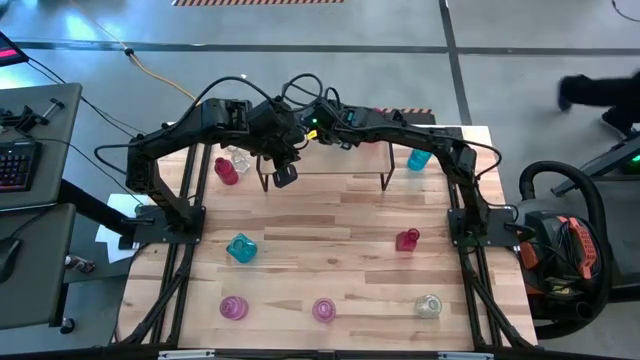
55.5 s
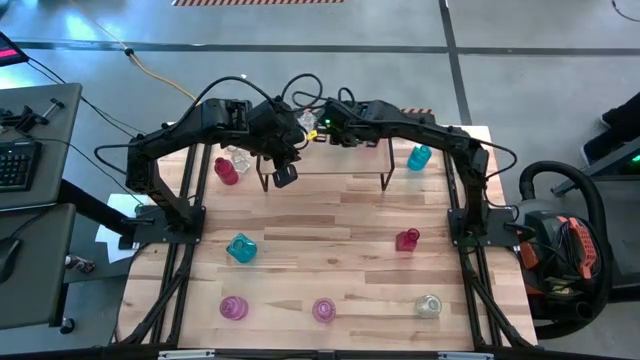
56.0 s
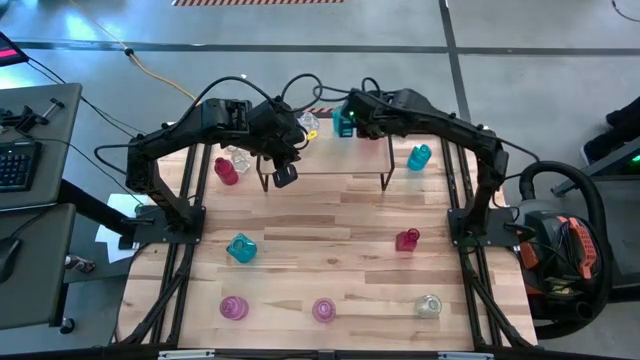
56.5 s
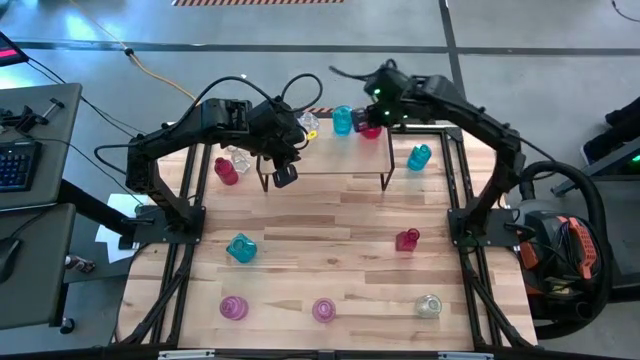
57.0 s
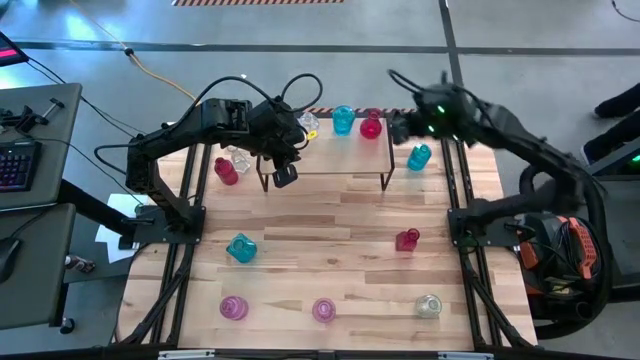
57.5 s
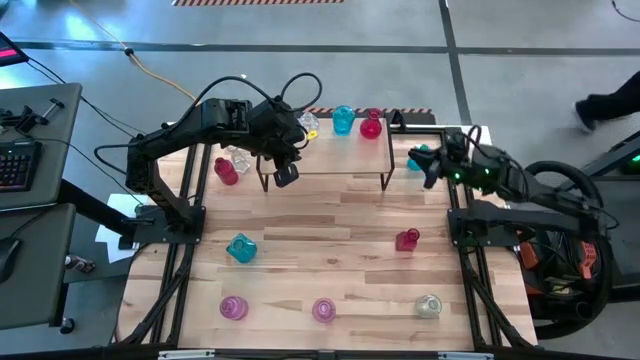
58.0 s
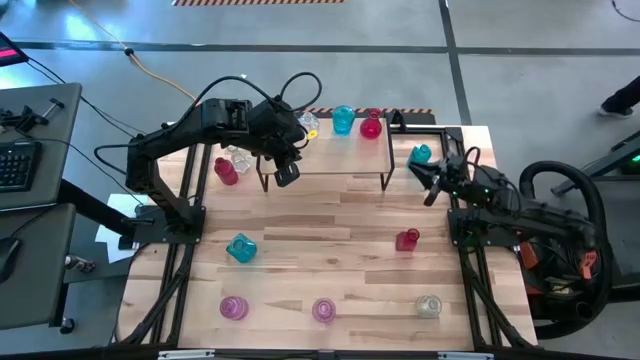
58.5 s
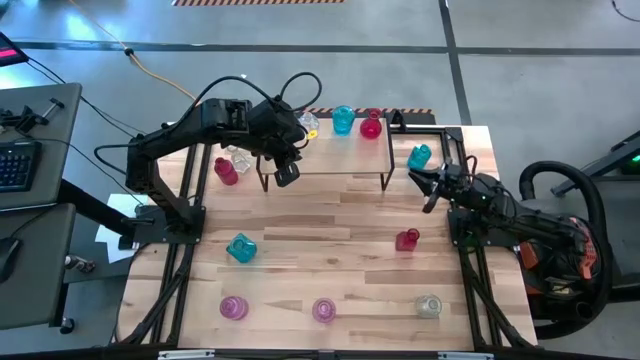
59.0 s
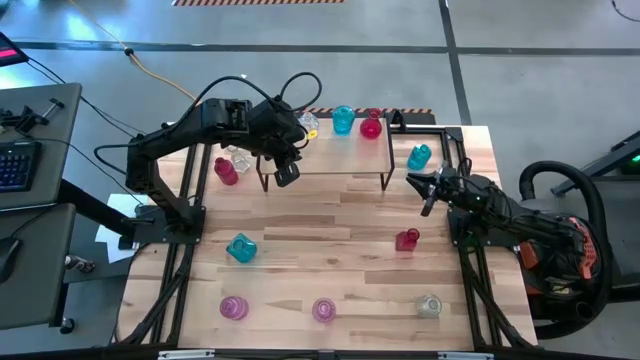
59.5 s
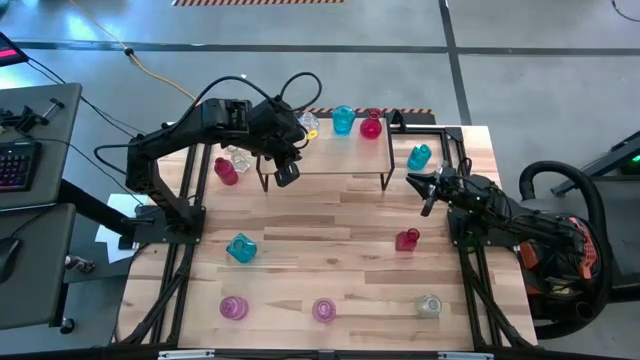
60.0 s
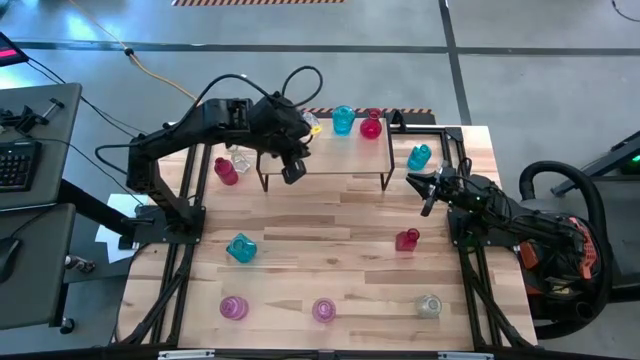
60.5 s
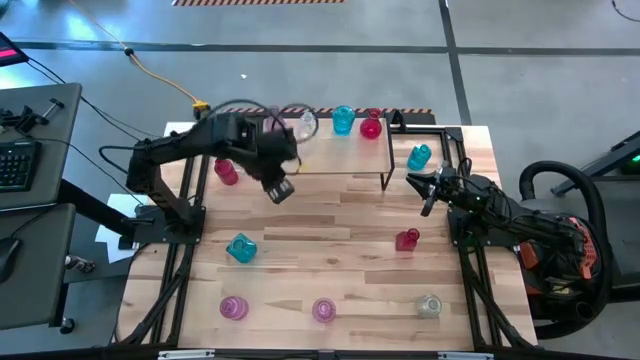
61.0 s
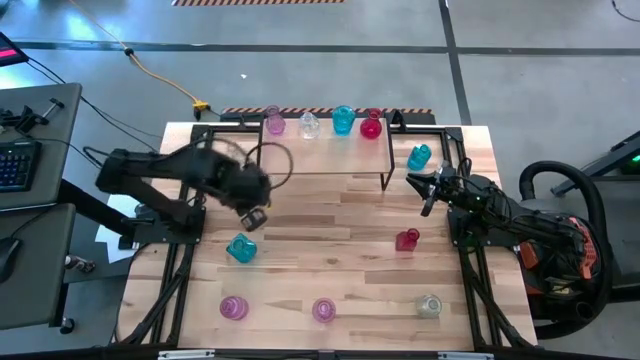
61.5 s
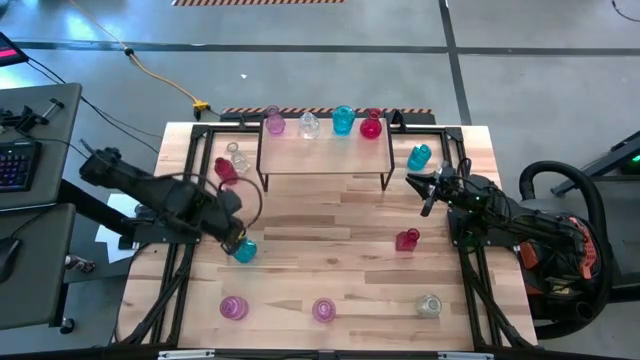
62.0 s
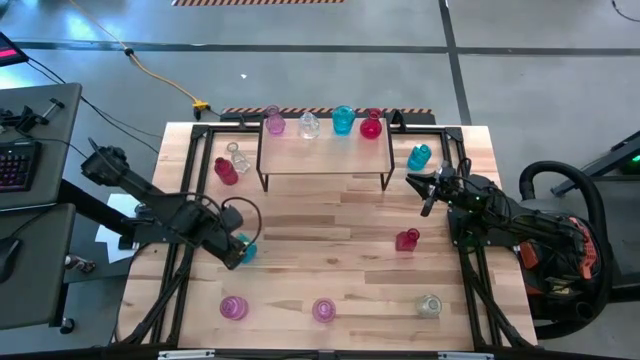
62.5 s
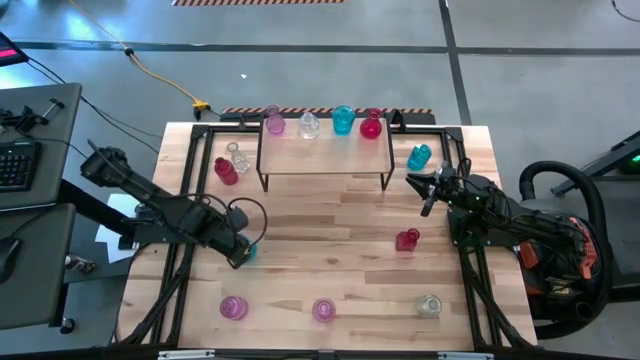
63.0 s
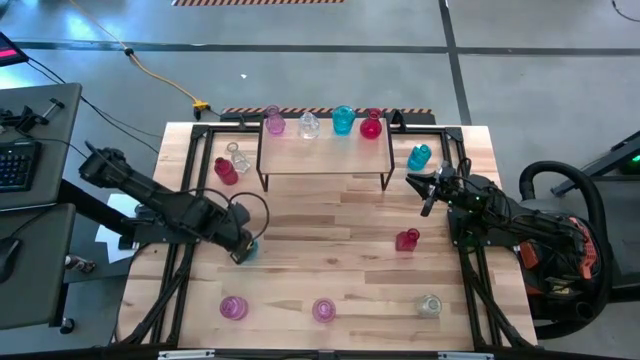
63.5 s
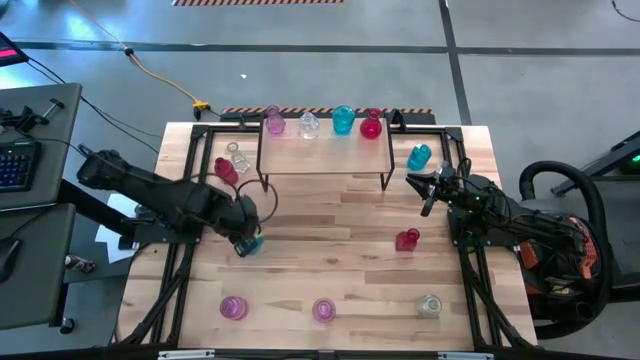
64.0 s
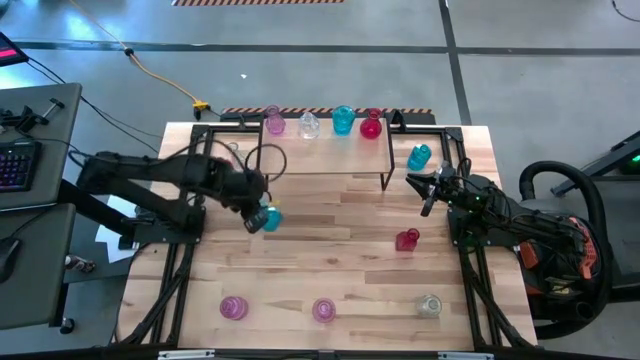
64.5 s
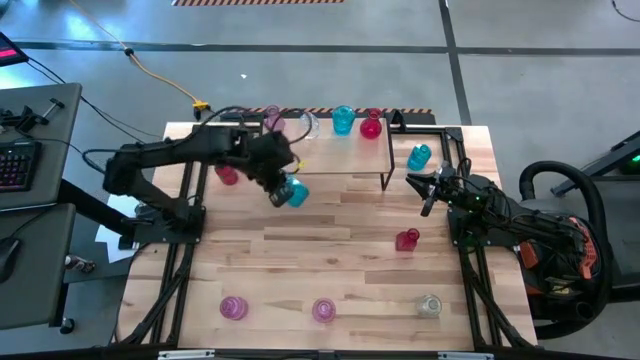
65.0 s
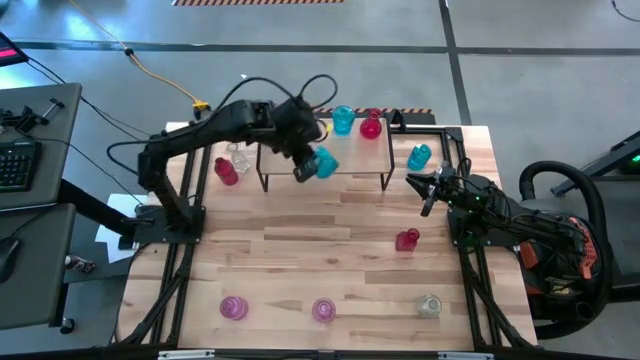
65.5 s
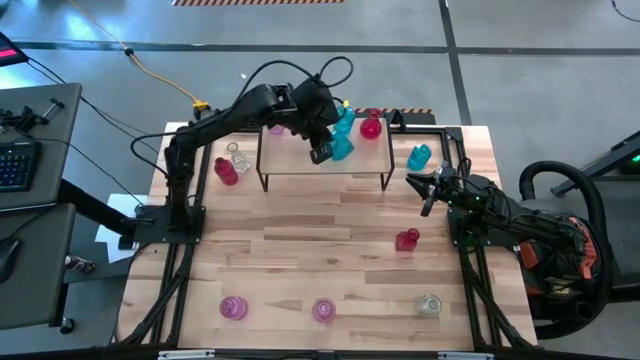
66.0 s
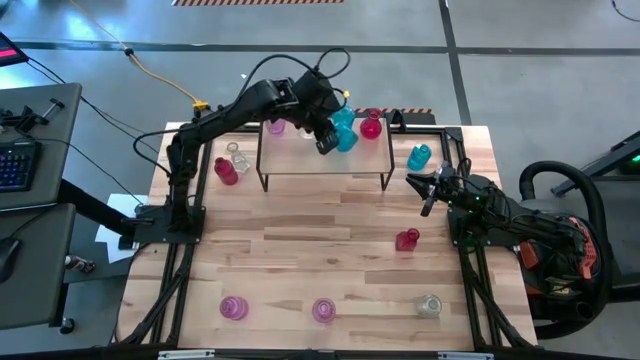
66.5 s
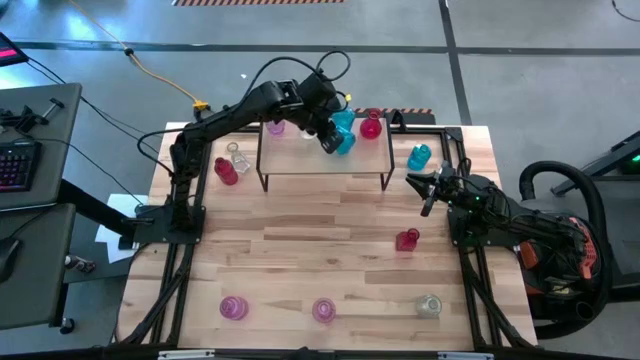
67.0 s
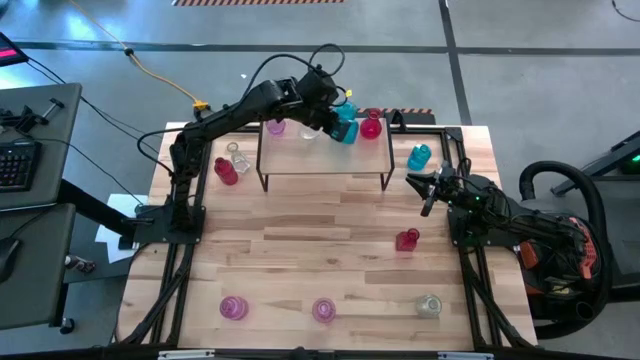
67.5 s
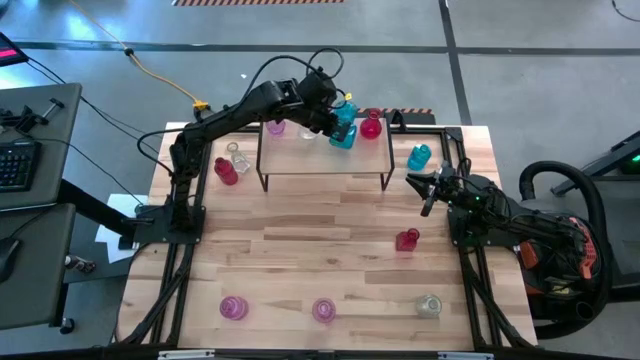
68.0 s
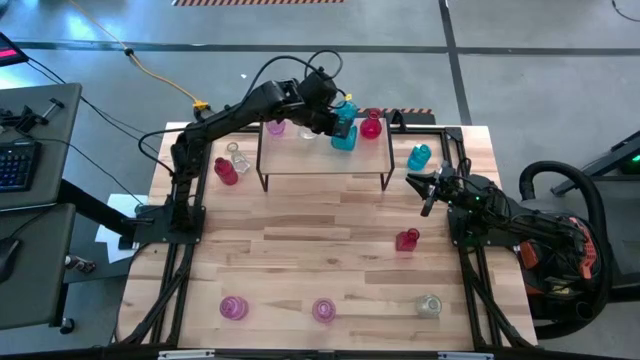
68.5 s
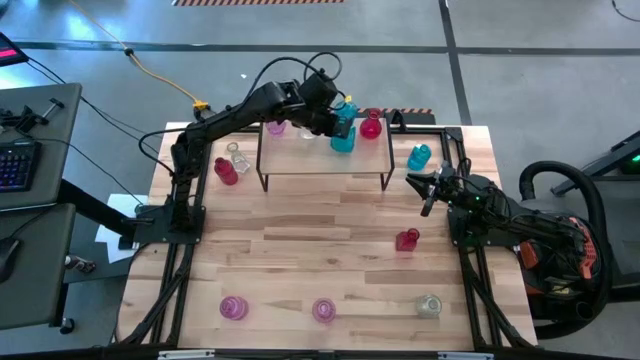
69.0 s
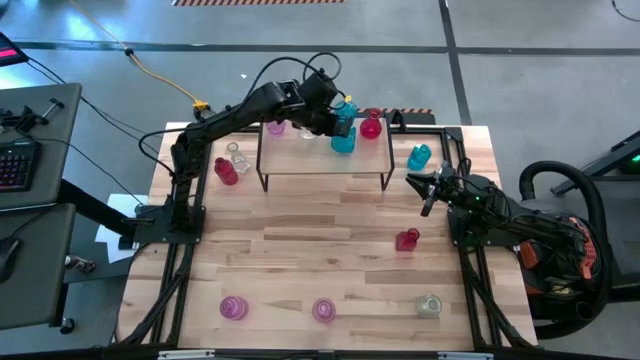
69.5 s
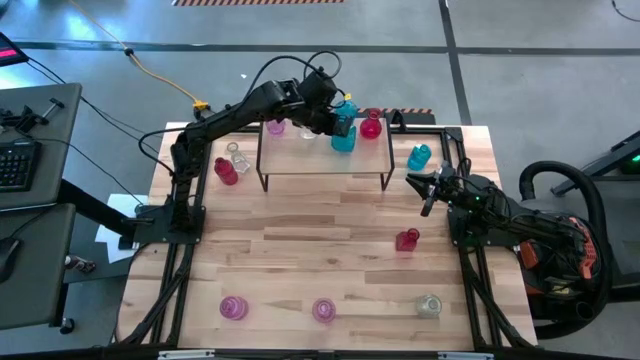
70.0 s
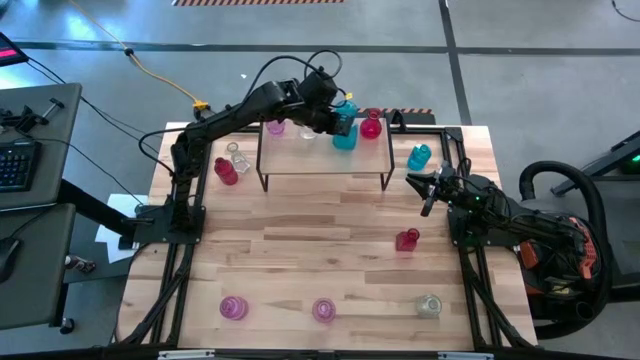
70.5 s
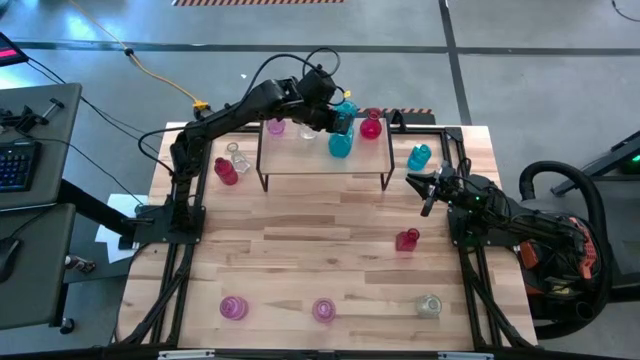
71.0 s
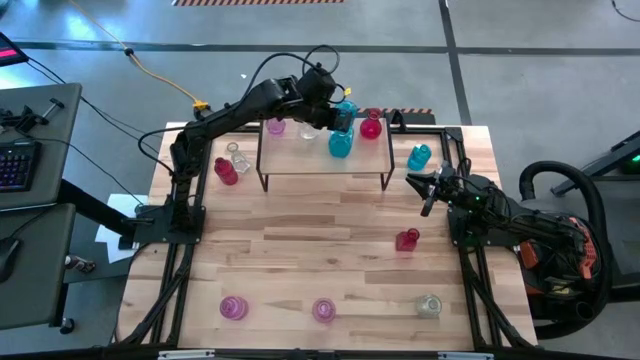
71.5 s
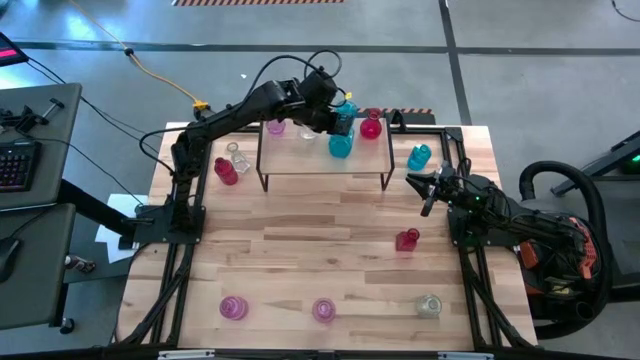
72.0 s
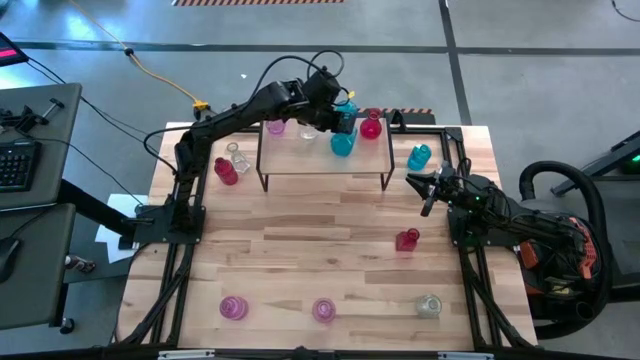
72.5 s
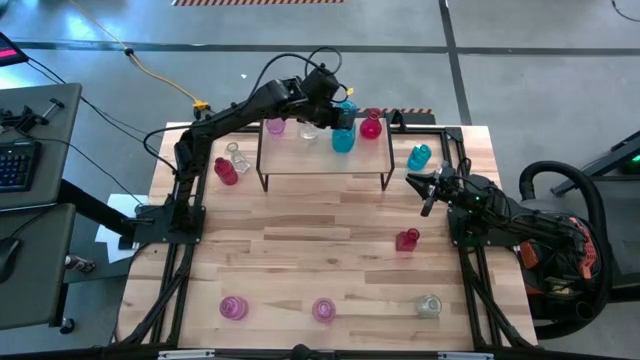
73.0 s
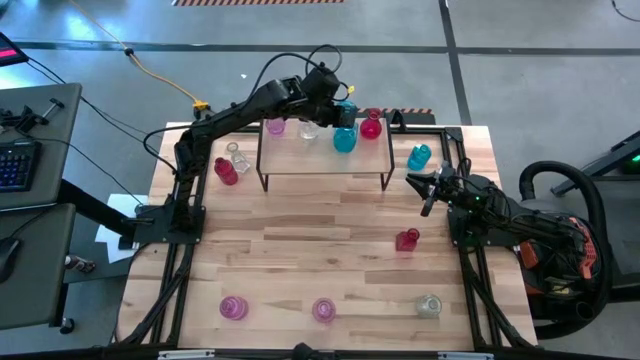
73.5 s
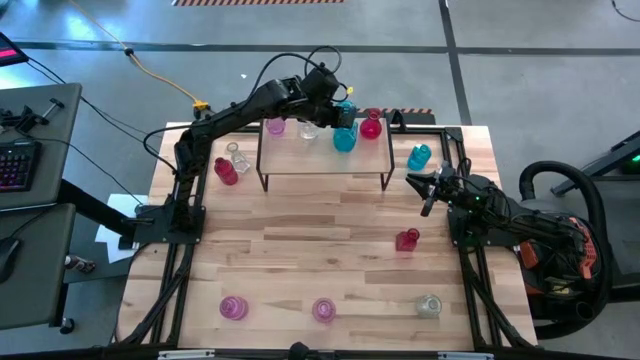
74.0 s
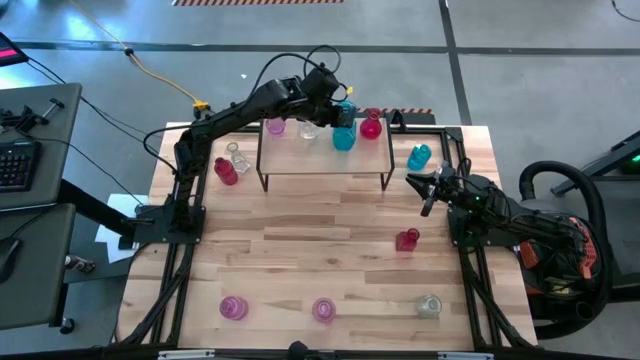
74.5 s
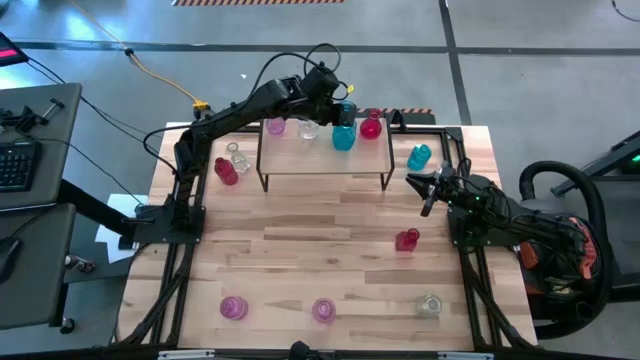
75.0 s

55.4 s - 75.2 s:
Task: sort vases onto shelf
Put the bottom blue vase on the shelf aligned with the other blue vase

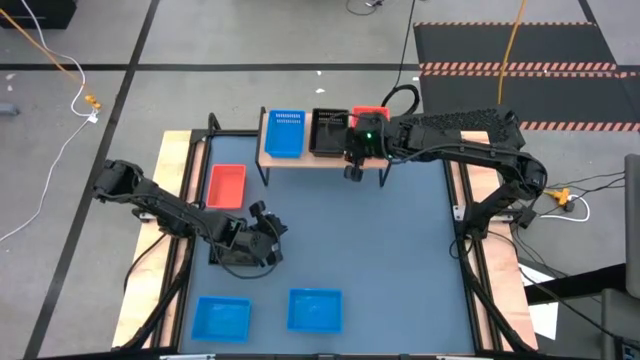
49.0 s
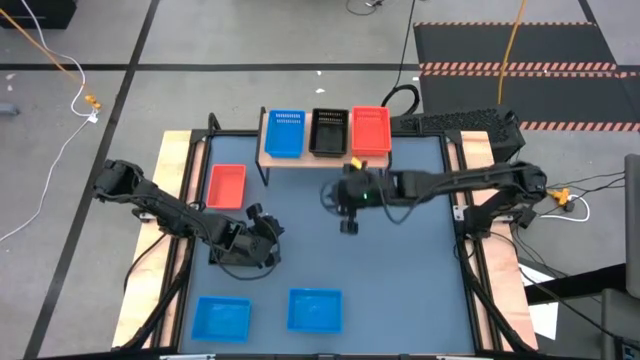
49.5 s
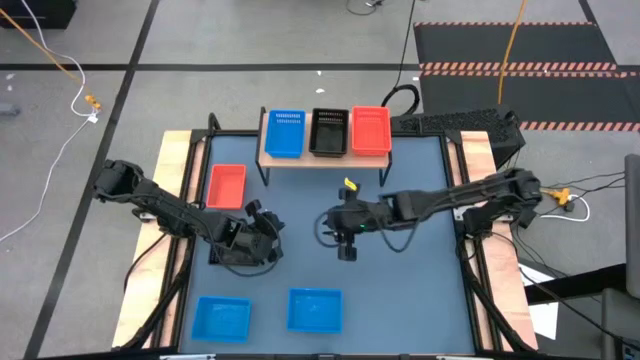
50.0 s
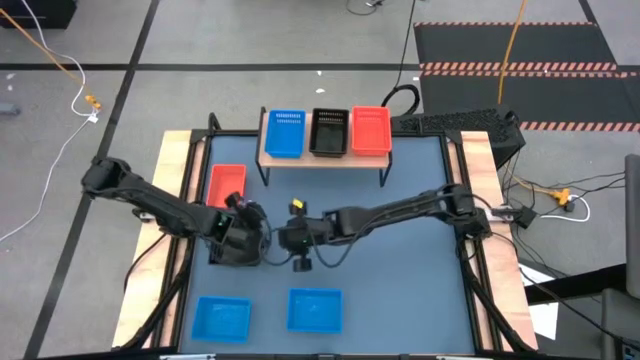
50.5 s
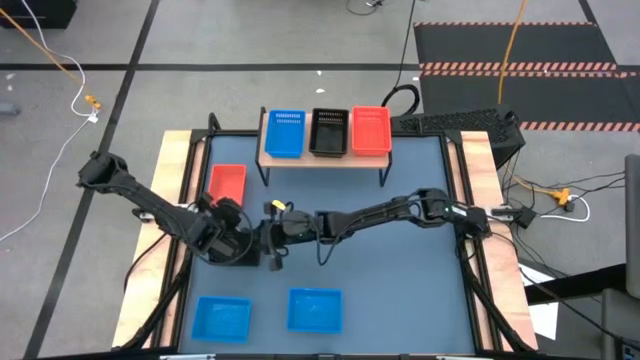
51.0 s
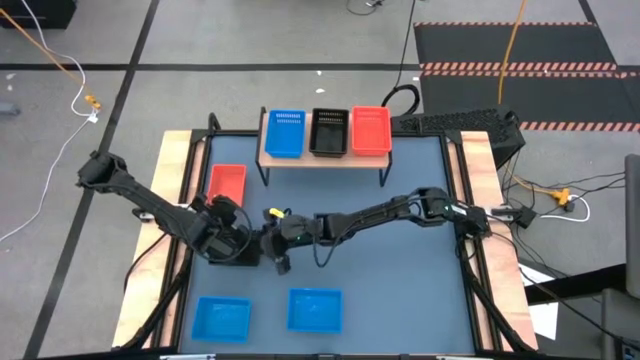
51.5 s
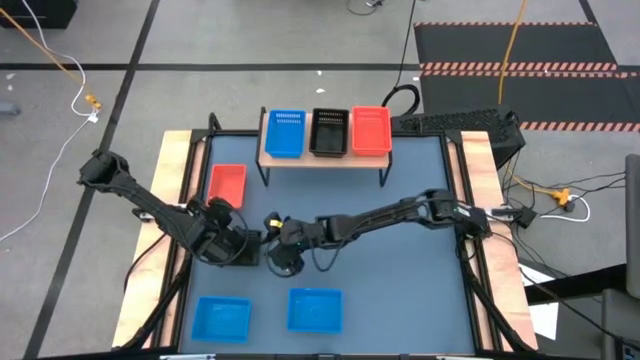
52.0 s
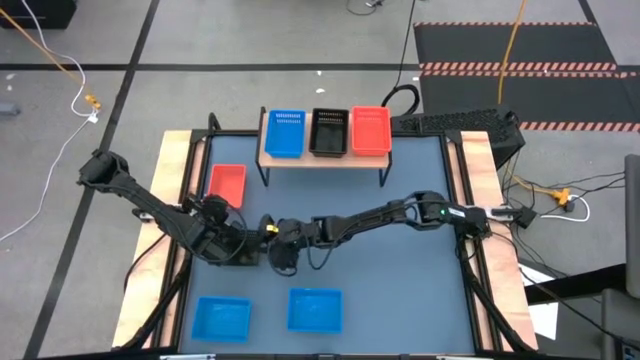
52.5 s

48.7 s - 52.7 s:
Task: Stack baskets on shelf by color
Stack the black bin on the stacked black bins on the shelf
